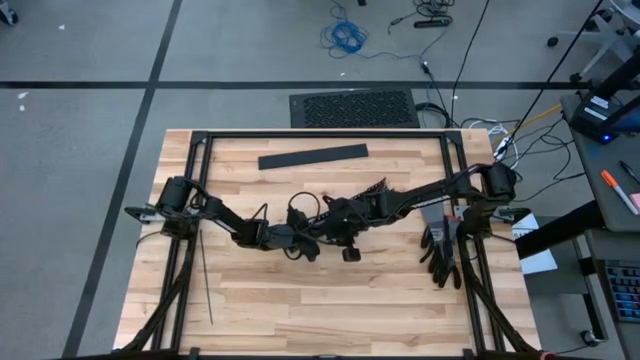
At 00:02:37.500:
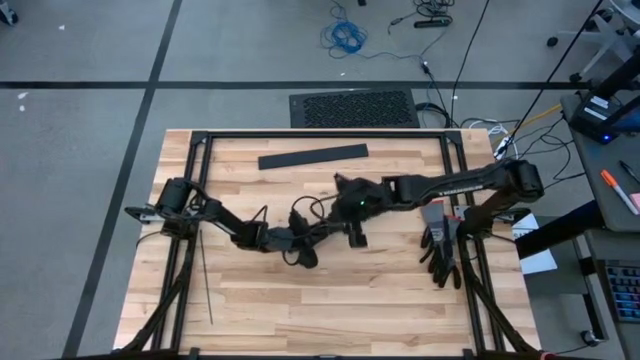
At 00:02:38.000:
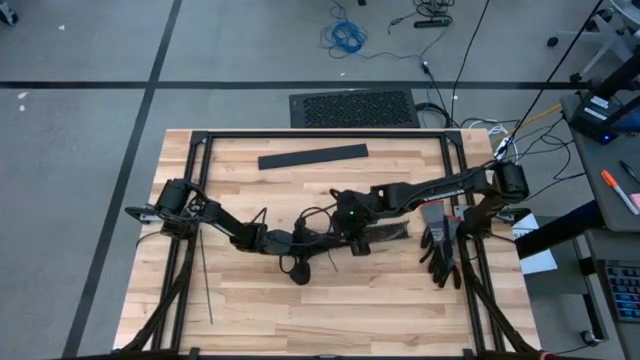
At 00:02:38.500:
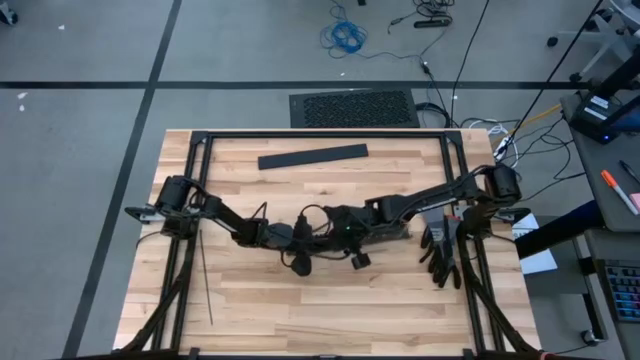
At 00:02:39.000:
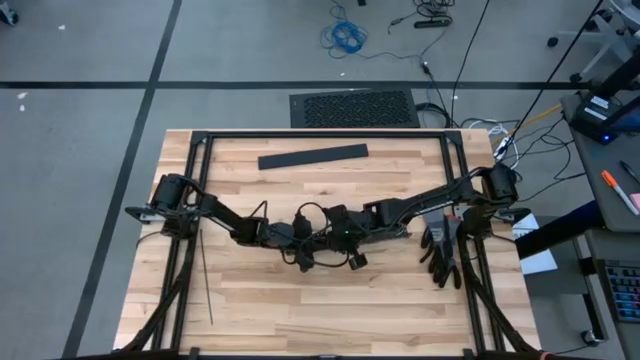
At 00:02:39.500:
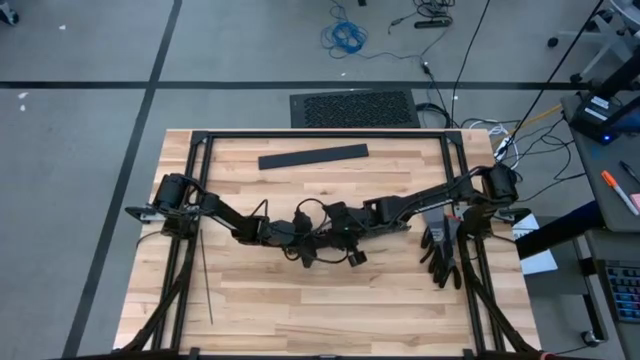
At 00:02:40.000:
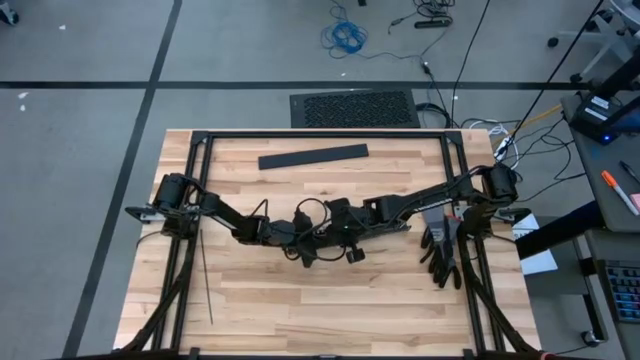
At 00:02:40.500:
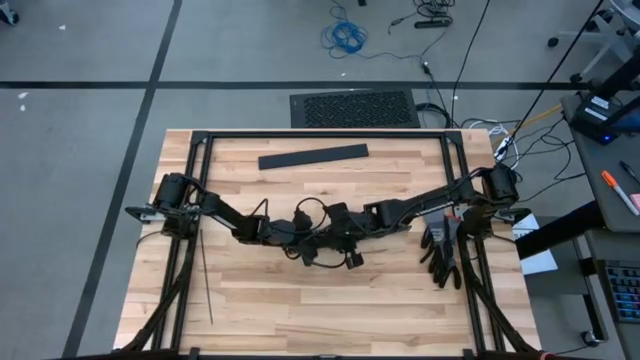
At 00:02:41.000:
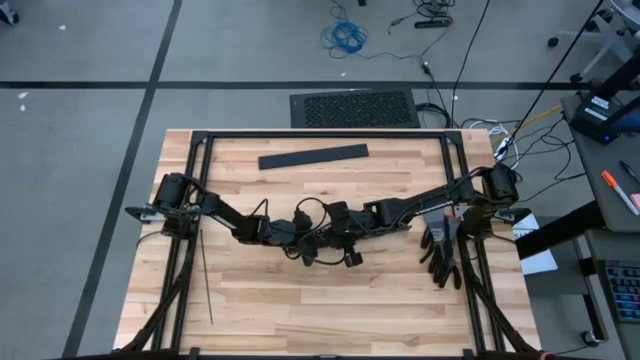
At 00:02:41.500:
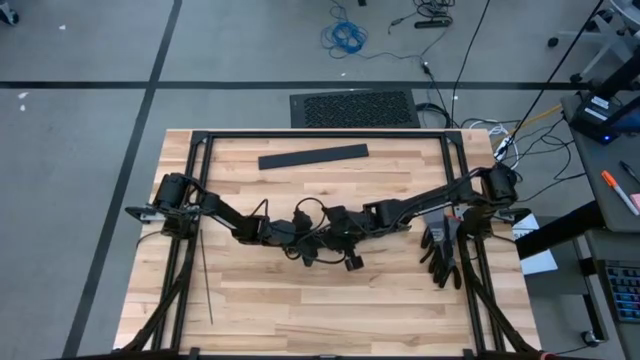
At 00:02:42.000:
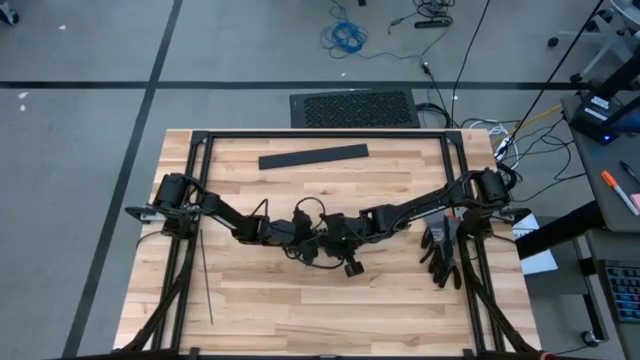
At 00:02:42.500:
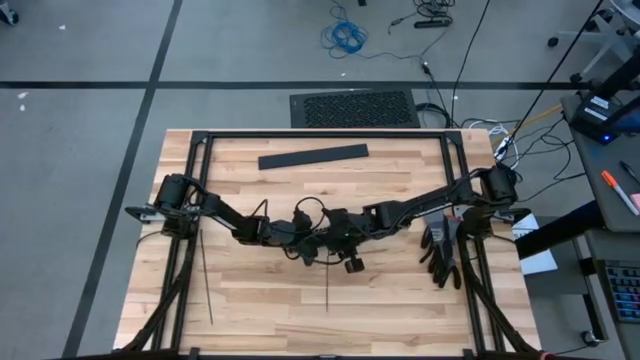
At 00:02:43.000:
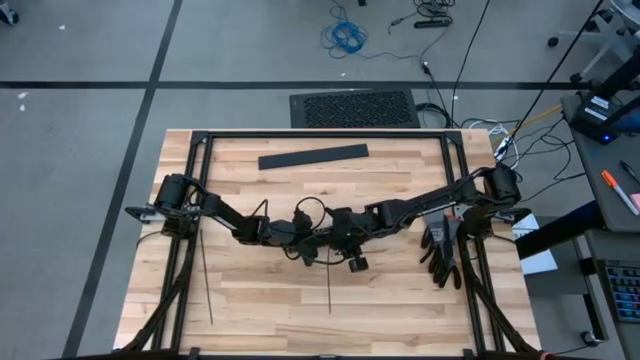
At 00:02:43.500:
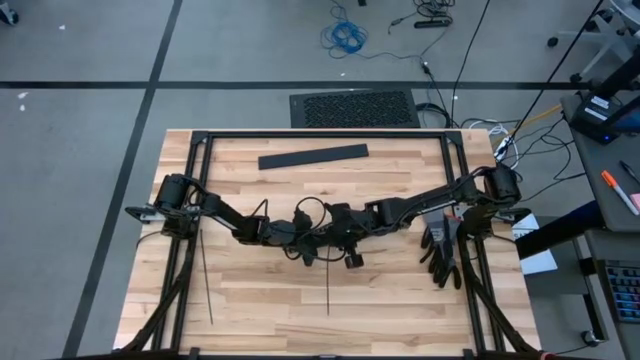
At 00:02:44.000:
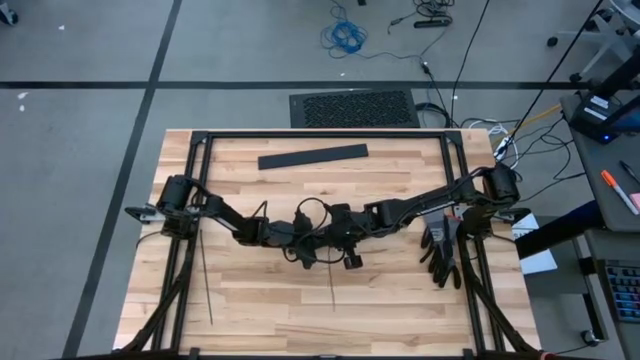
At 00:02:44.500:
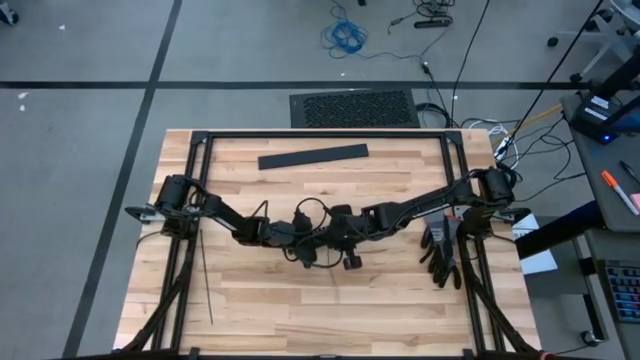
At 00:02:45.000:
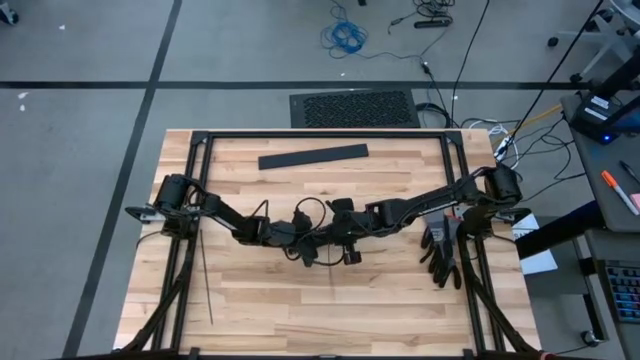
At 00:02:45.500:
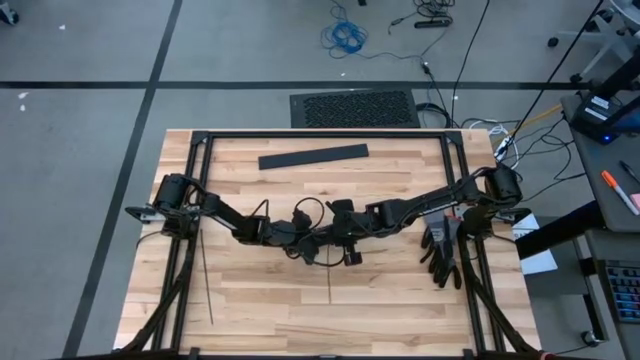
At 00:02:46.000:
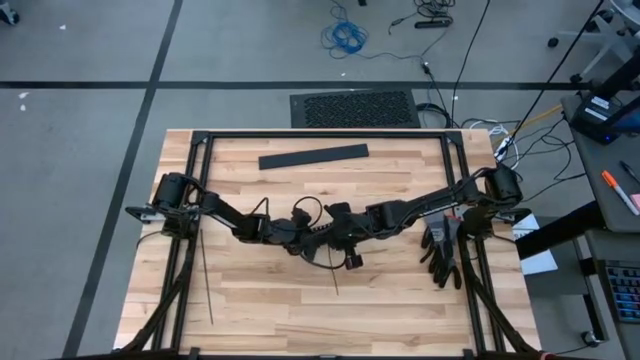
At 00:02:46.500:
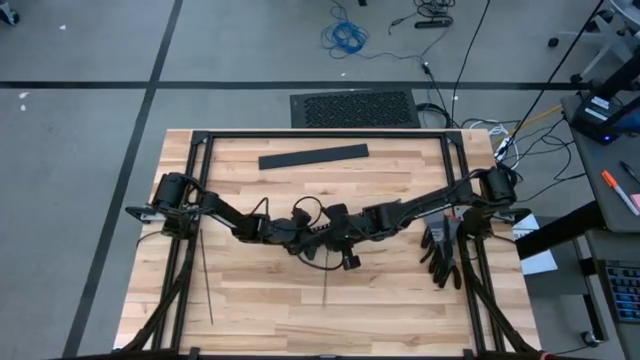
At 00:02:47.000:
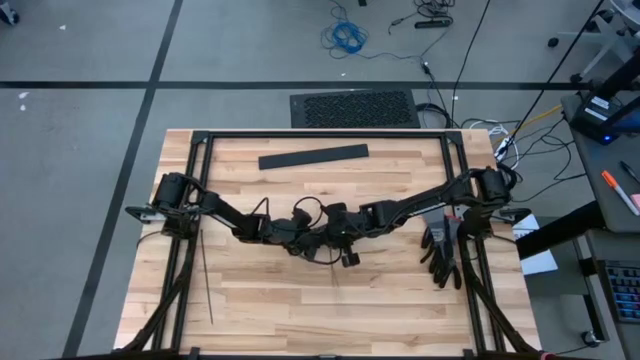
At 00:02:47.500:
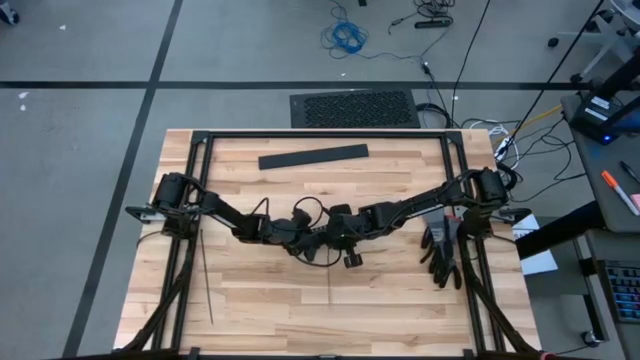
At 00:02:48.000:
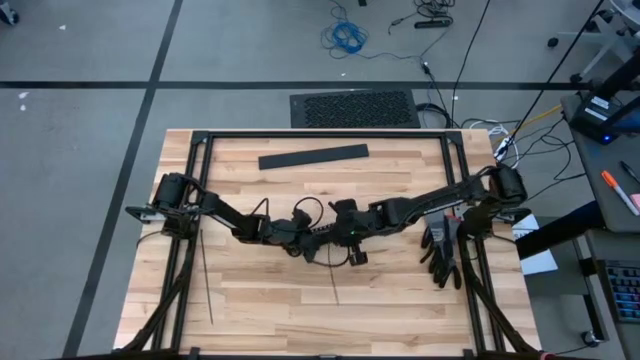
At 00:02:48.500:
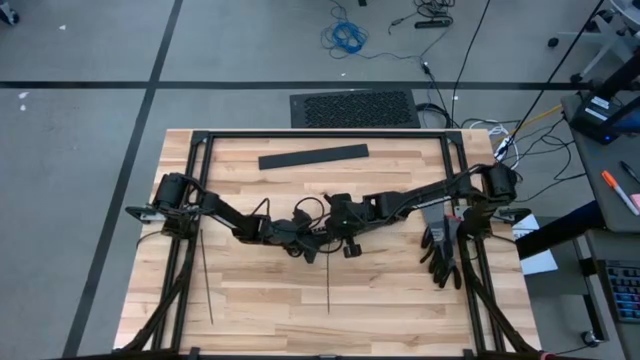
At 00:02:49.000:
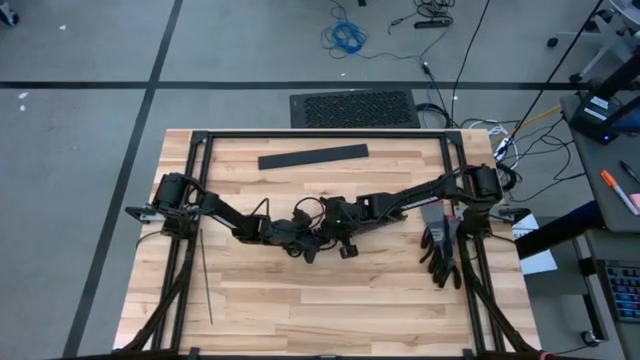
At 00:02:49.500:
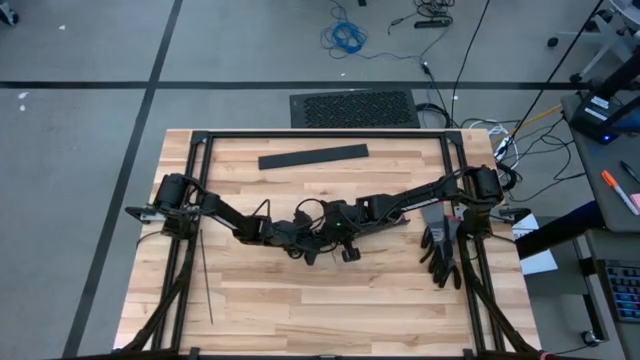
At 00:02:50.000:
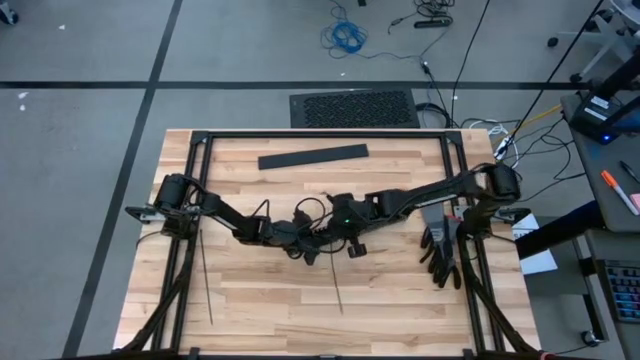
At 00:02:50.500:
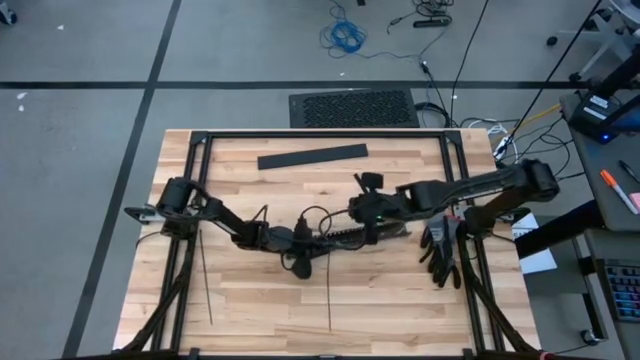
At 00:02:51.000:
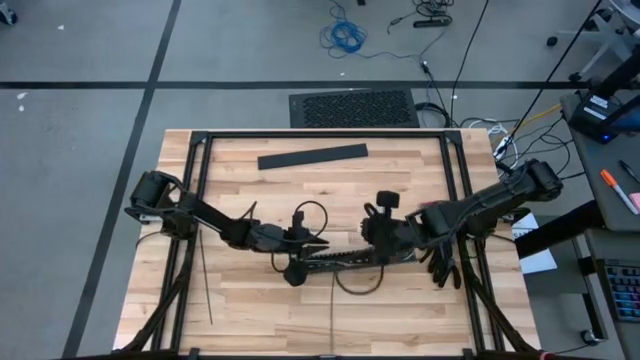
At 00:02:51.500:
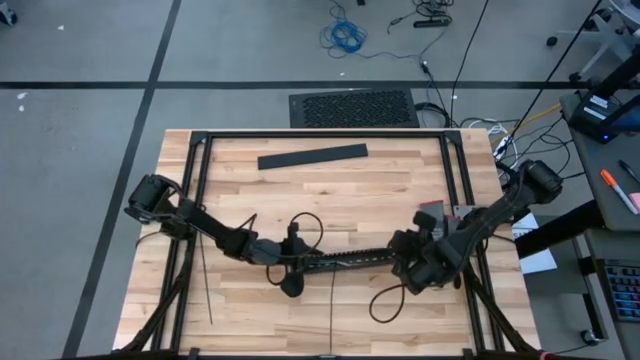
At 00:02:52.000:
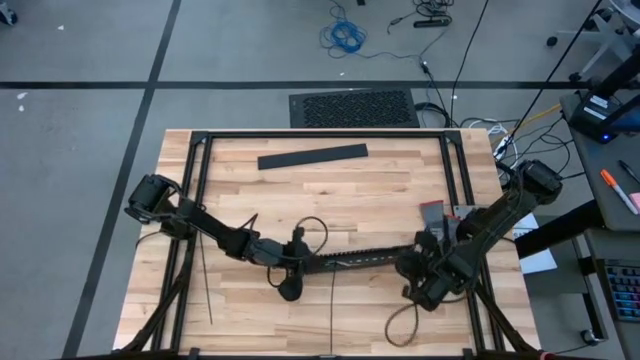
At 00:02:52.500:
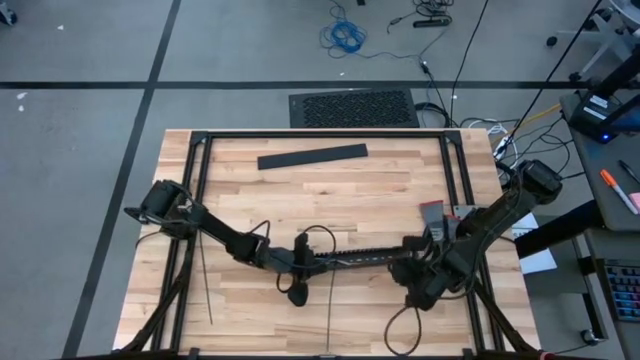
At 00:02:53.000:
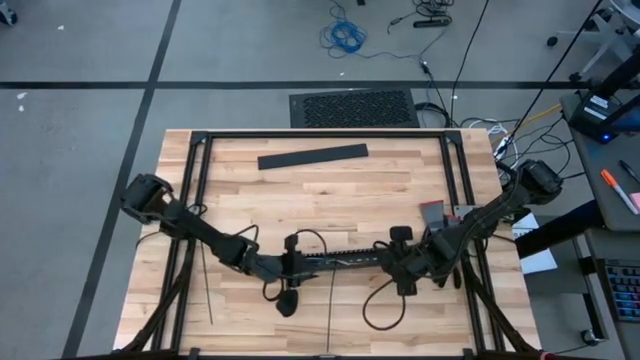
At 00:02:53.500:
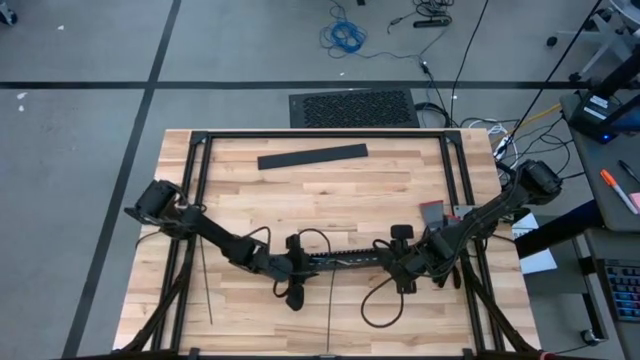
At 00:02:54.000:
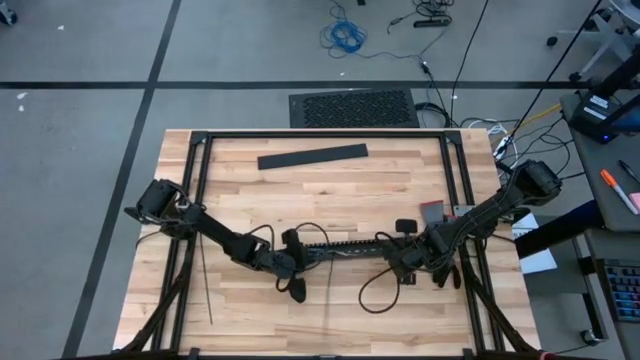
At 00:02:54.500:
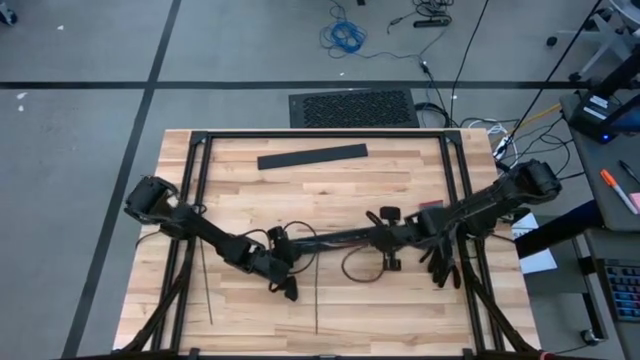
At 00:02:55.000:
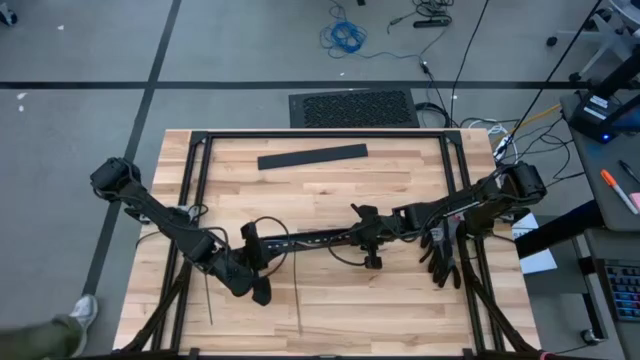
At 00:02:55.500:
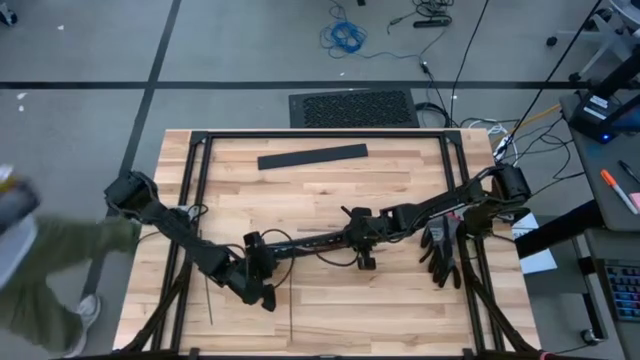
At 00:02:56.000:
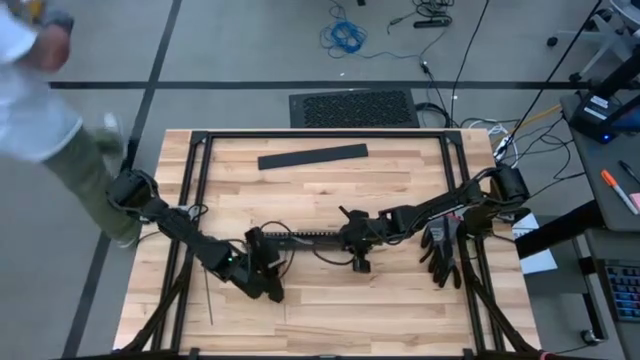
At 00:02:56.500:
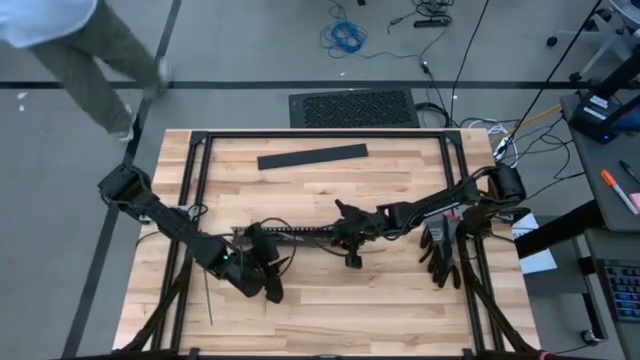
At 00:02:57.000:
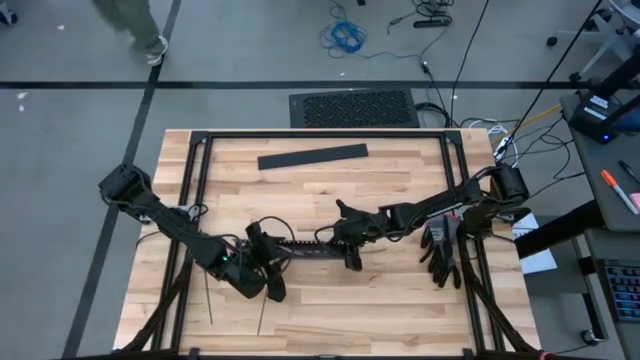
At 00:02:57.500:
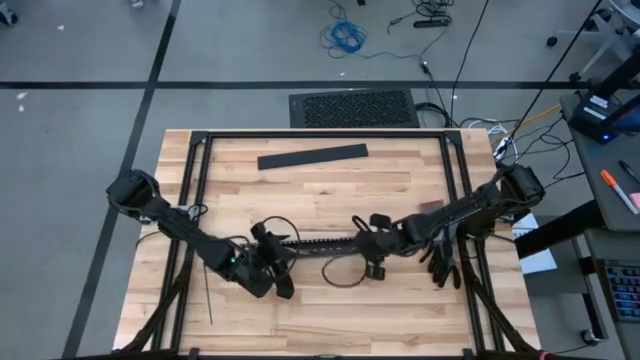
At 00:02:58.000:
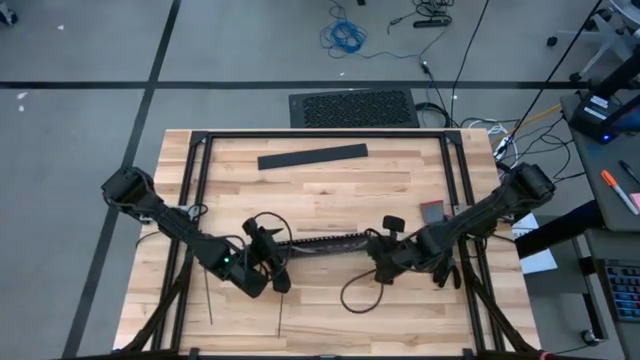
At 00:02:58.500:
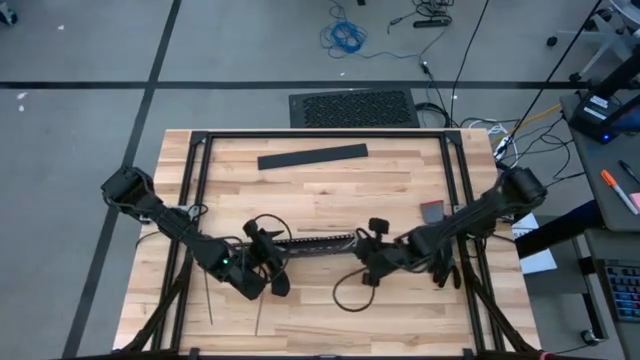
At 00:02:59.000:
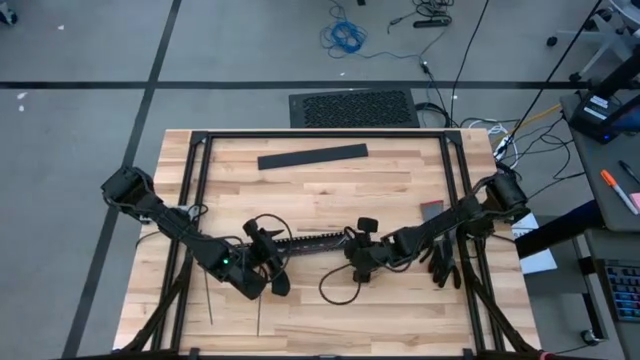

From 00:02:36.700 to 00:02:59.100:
Task: Ziptie cables
Put the zip tied cable wires into the black cable duct
